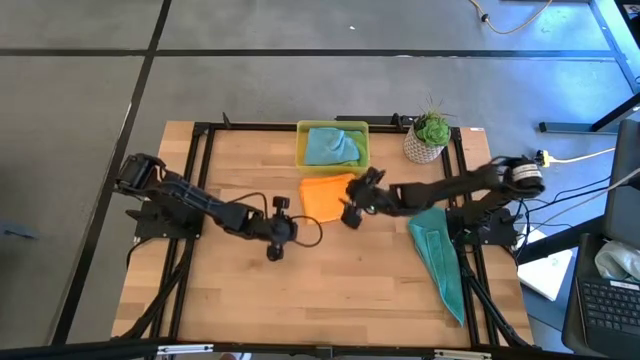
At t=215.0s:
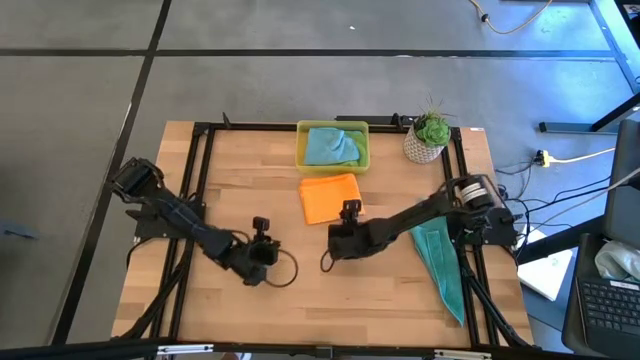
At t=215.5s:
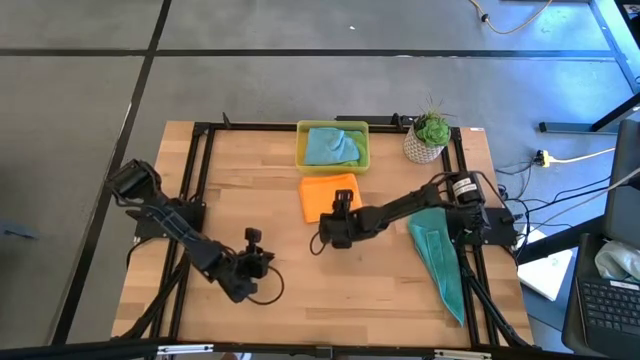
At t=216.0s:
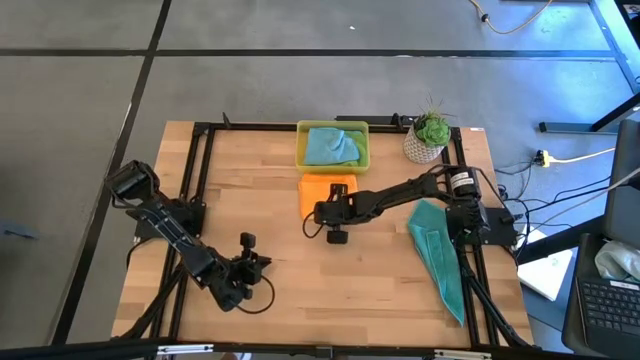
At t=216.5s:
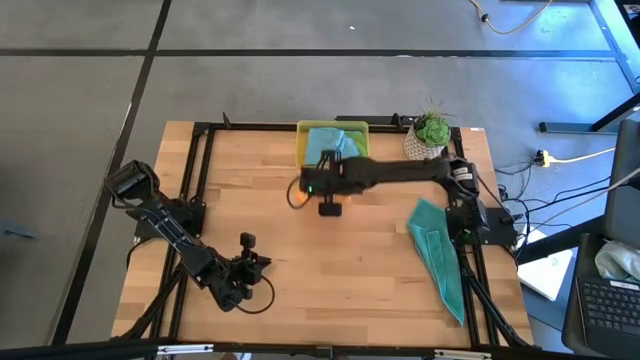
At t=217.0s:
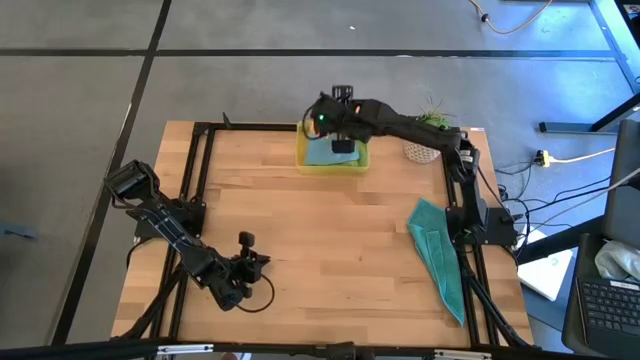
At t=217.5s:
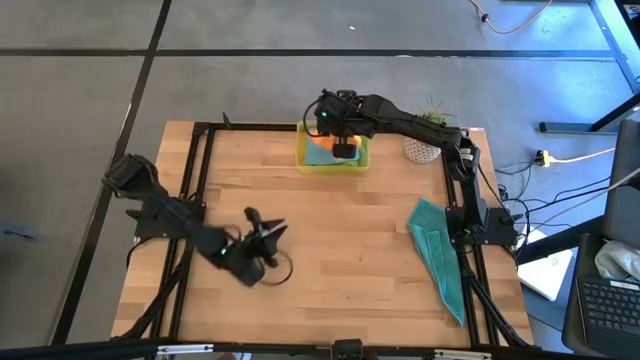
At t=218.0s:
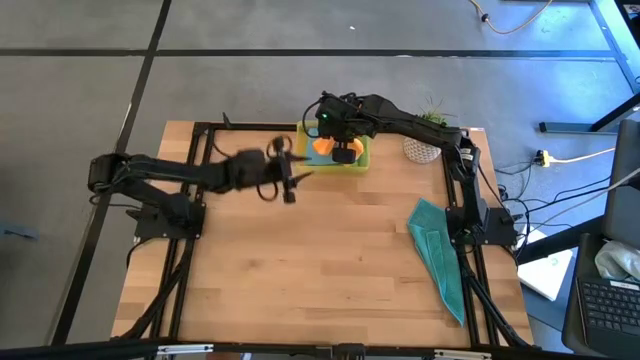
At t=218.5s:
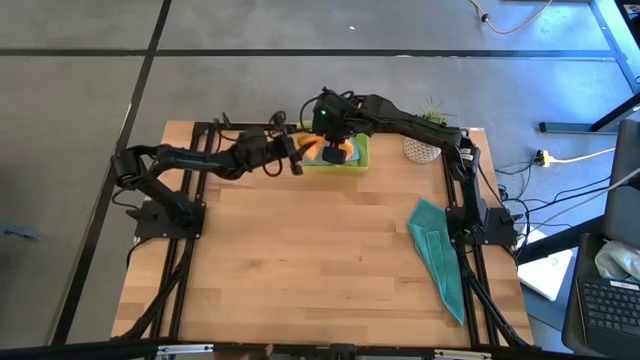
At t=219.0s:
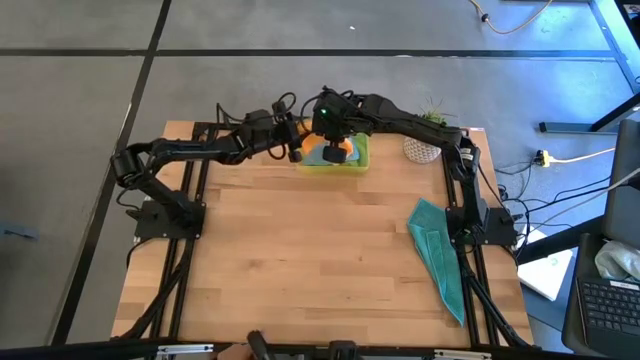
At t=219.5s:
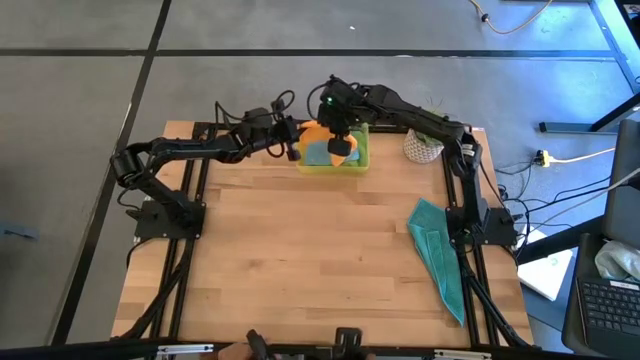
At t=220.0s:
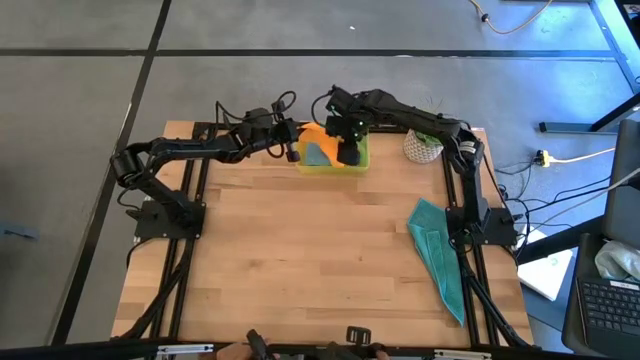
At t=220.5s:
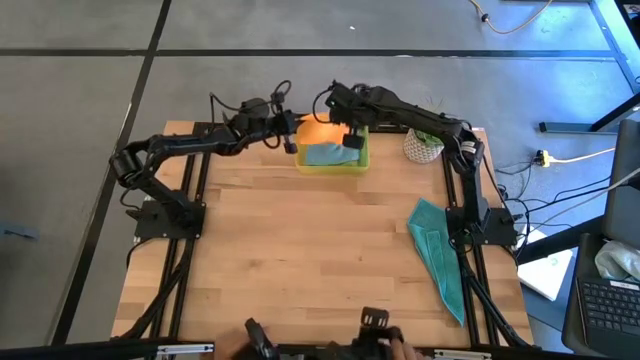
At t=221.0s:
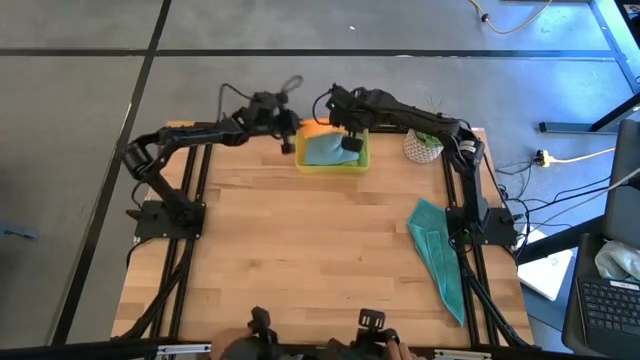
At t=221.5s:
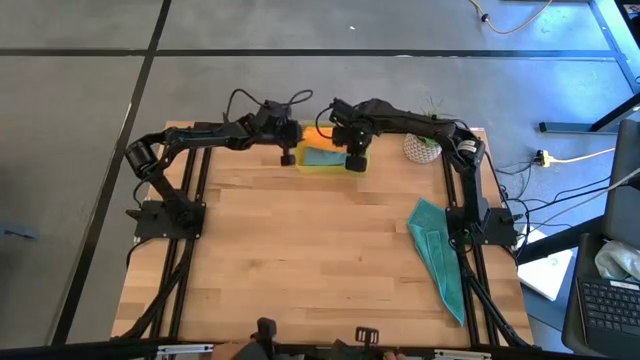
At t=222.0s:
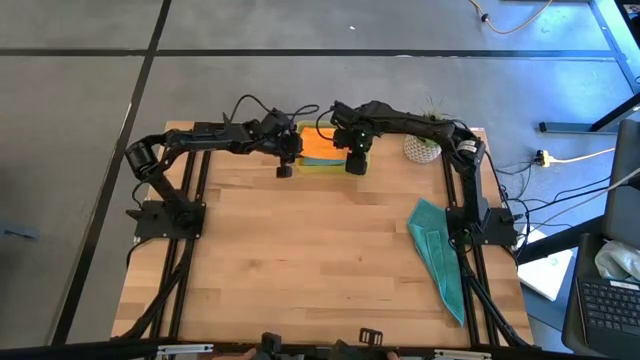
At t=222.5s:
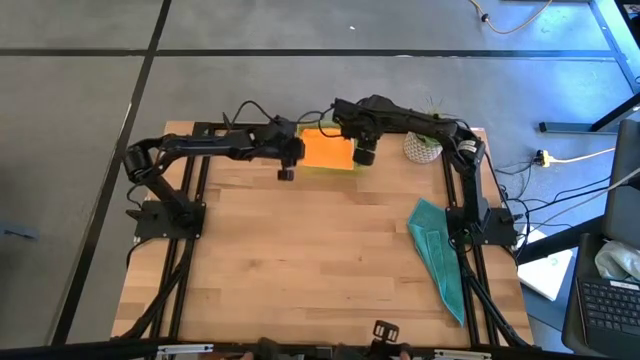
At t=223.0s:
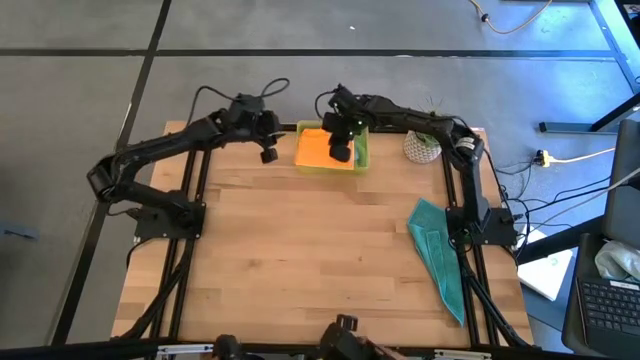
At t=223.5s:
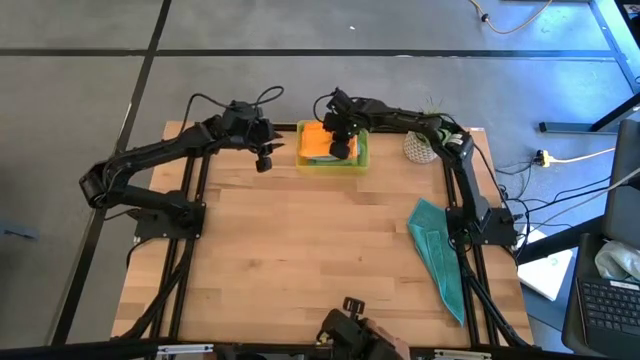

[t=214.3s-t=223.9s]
Task: Fold microfiber towels
Put the orange folded cloth into the yellow bin

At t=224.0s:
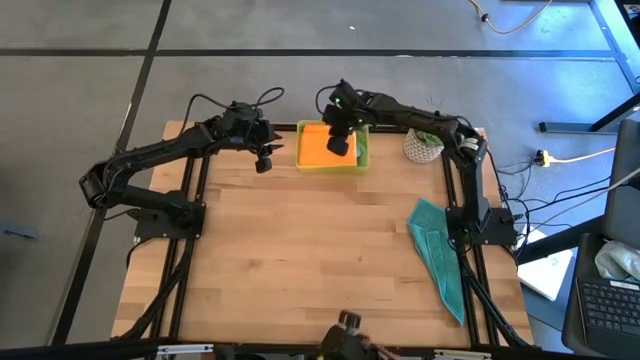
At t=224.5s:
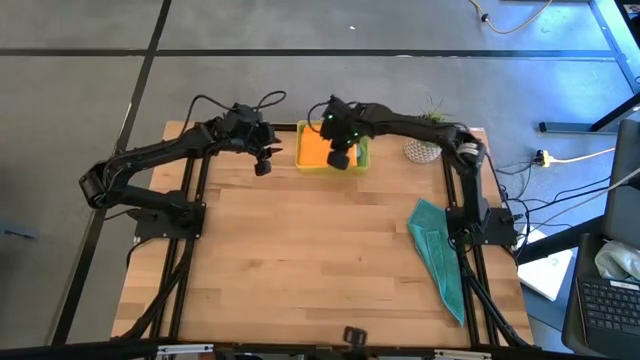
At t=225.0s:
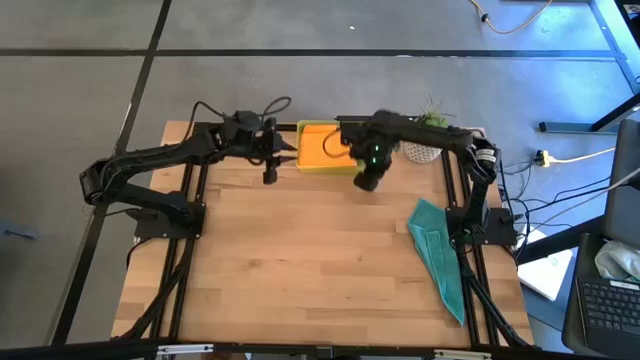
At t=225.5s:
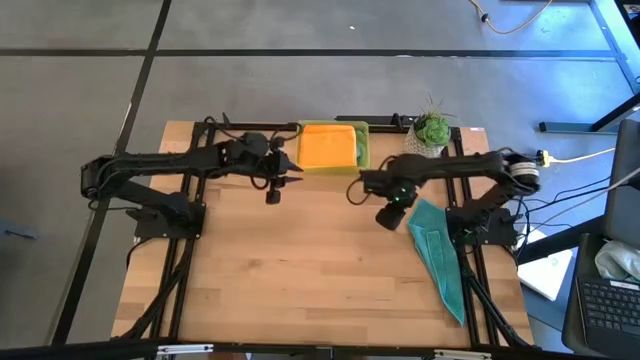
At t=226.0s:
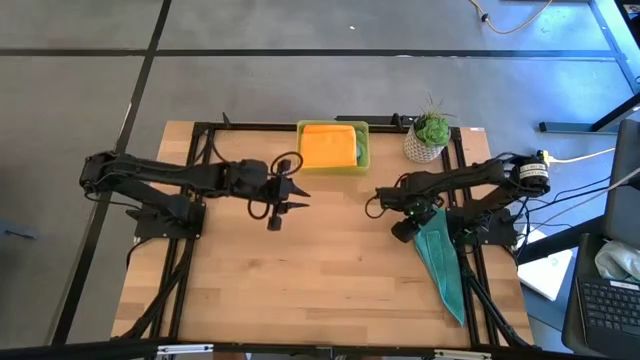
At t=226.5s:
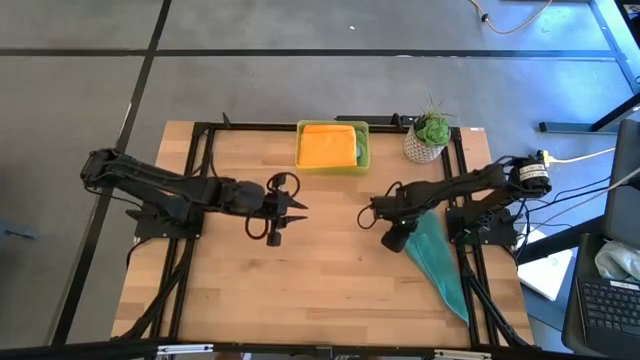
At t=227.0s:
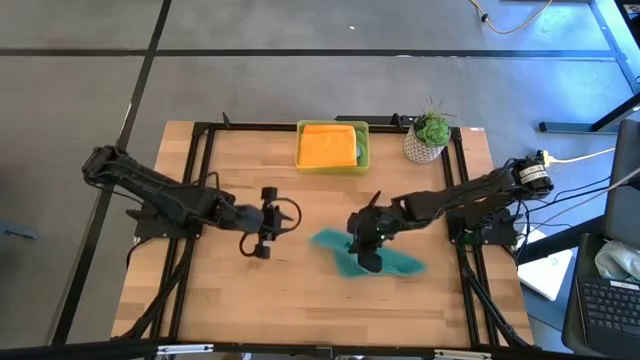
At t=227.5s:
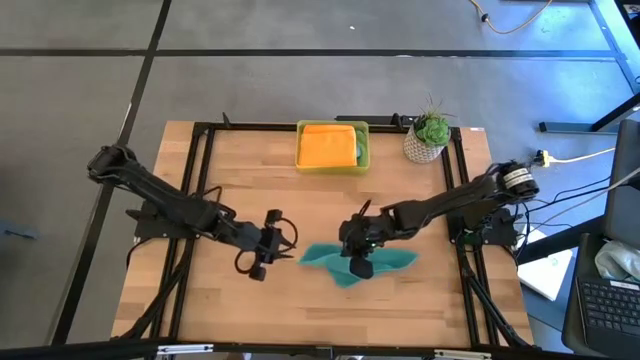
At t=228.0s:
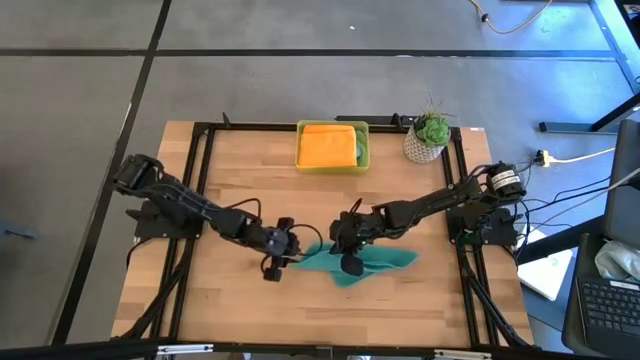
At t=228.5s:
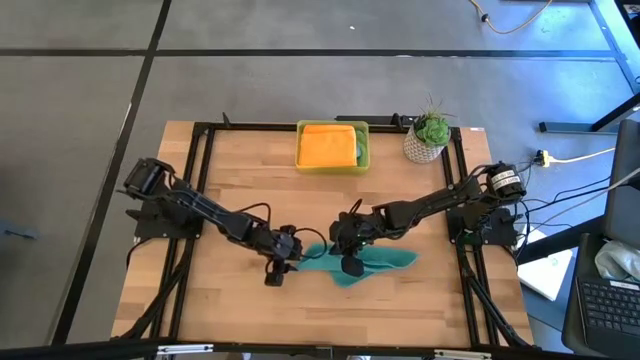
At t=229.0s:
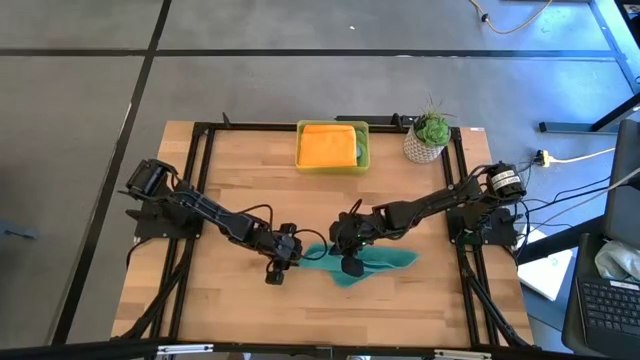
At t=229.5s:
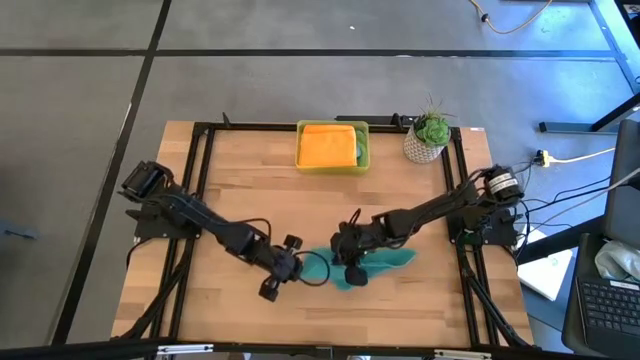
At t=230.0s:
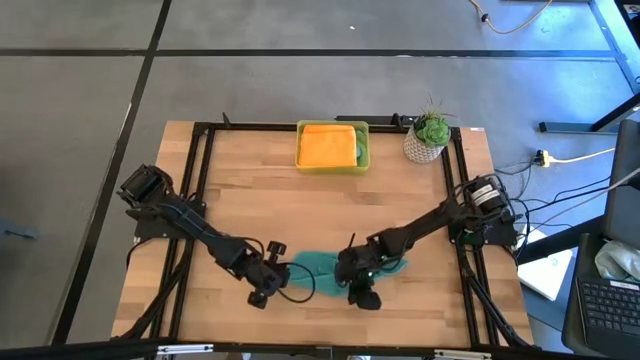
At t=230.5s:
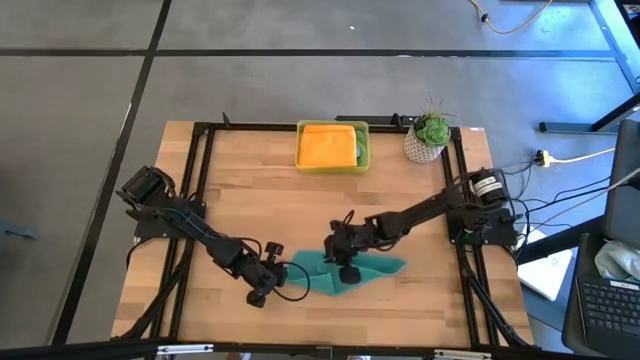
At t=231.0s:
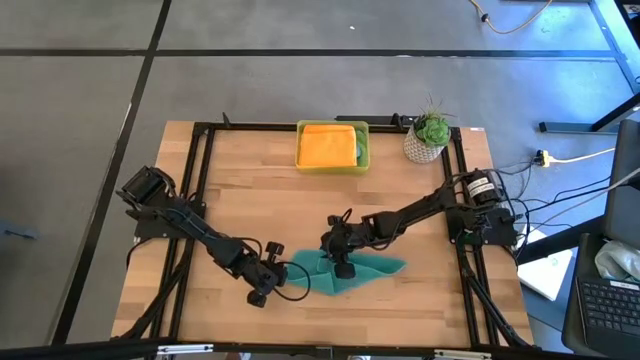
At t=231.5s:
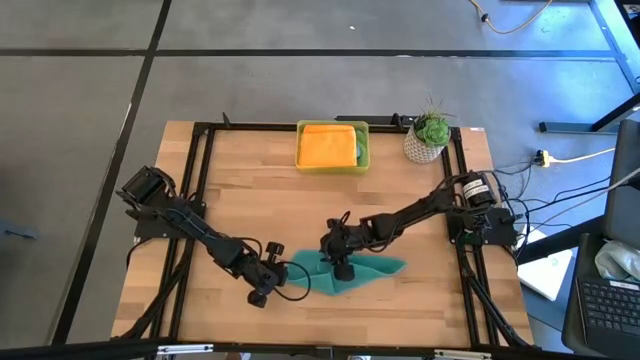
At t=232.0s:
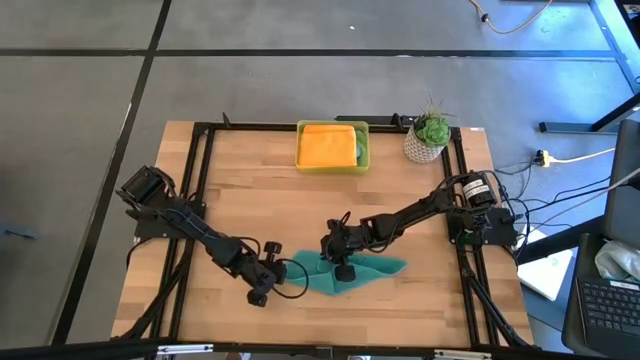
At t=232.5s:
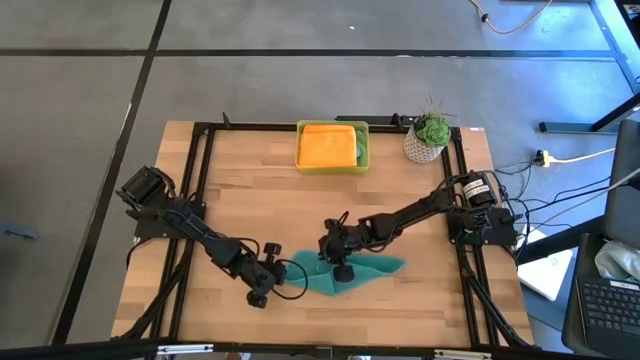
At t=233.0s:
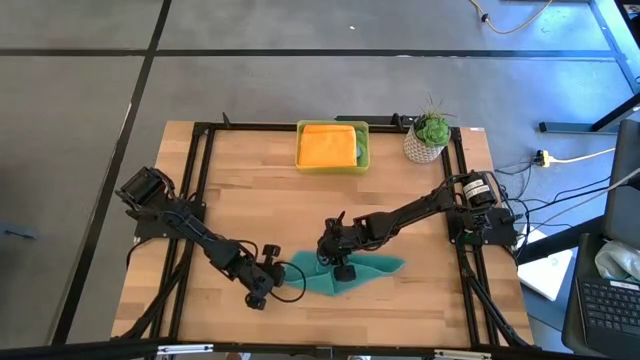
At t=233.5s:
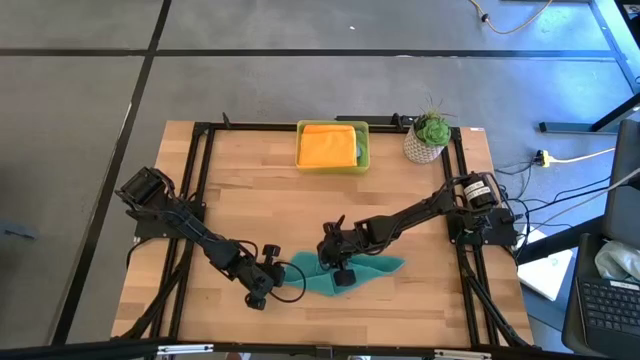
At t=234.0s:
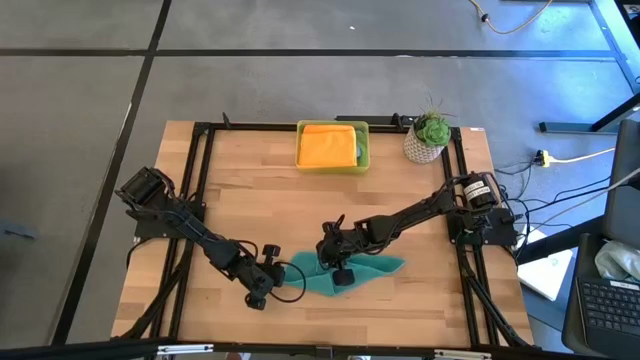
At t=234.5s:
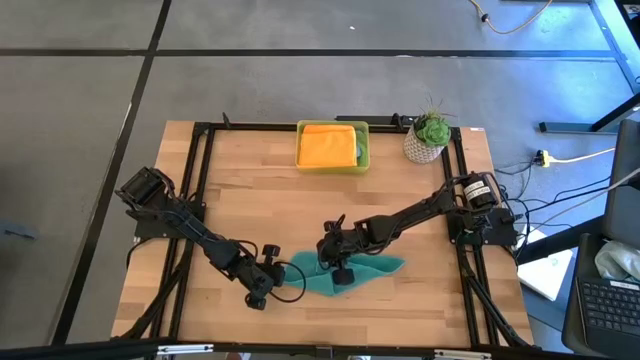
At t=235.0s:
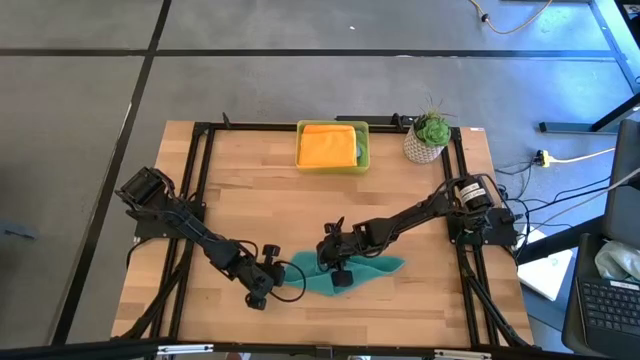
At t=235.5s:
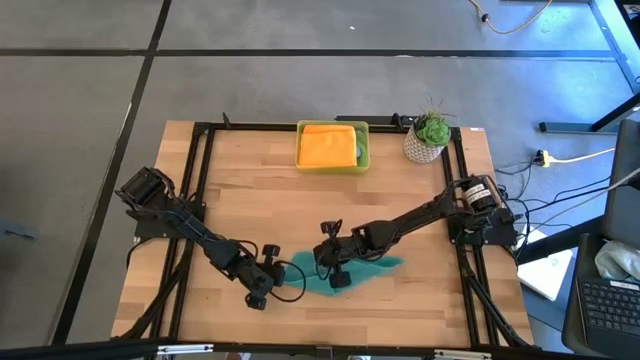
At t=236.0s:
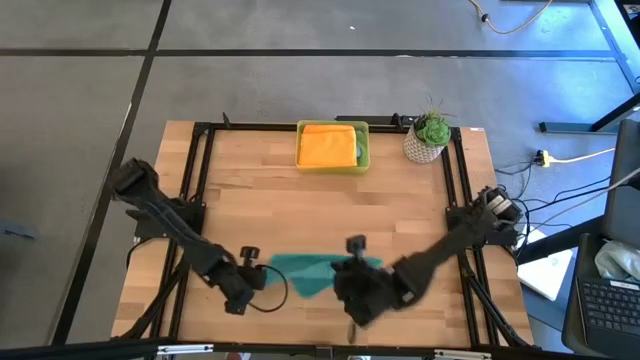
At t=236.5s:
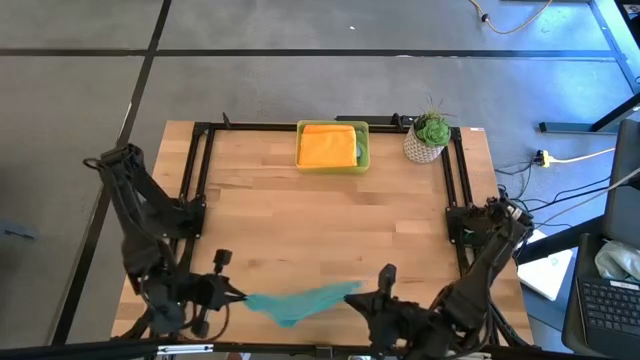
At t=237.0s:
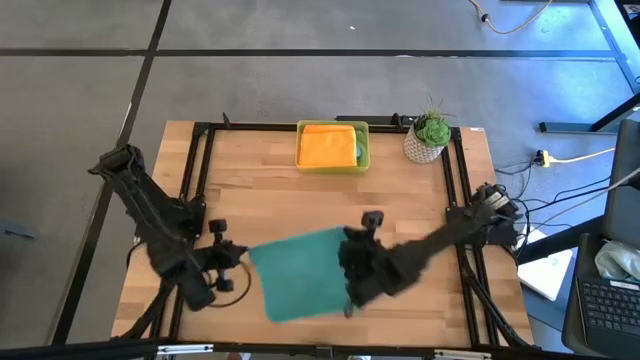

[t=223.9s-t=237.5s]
Fold the blue cloth
